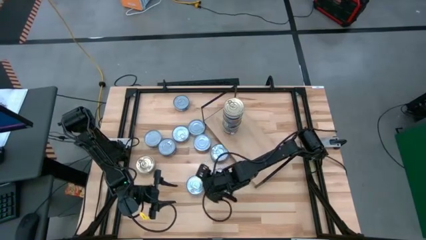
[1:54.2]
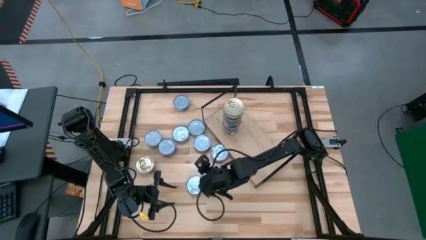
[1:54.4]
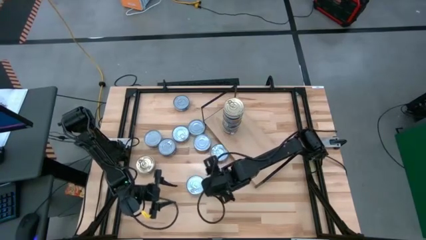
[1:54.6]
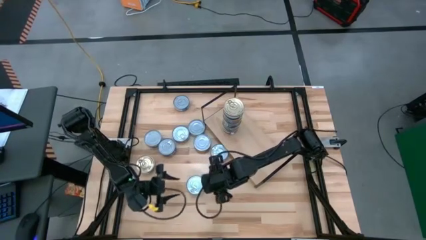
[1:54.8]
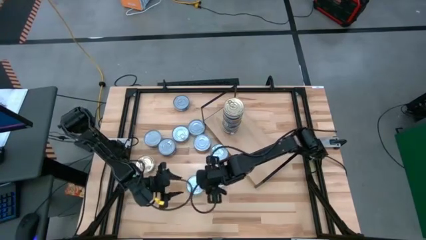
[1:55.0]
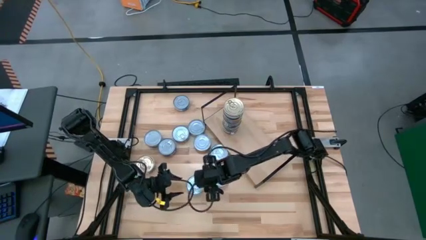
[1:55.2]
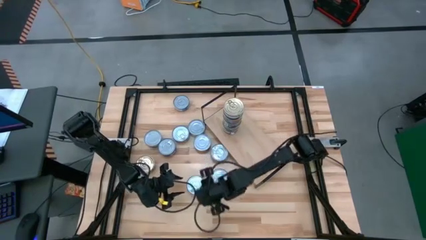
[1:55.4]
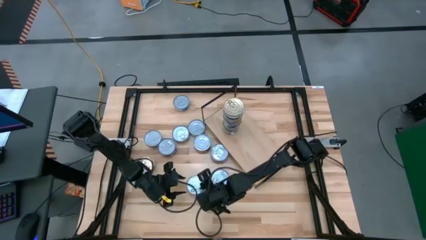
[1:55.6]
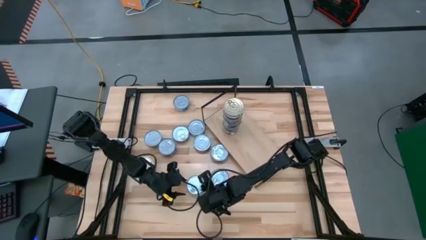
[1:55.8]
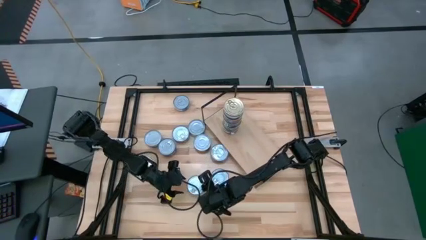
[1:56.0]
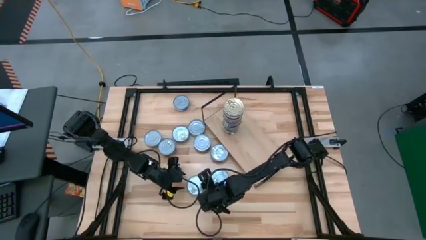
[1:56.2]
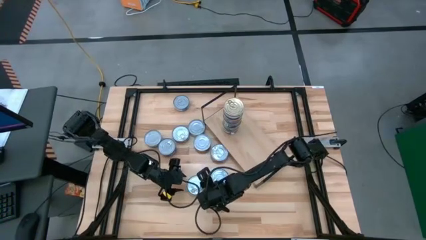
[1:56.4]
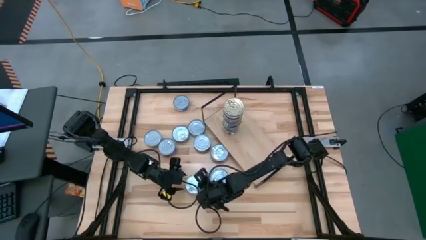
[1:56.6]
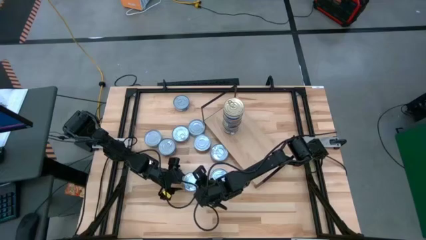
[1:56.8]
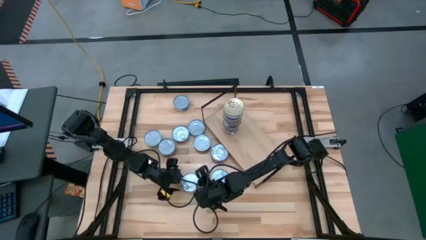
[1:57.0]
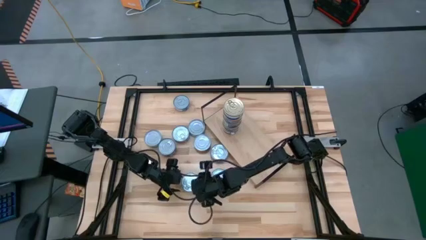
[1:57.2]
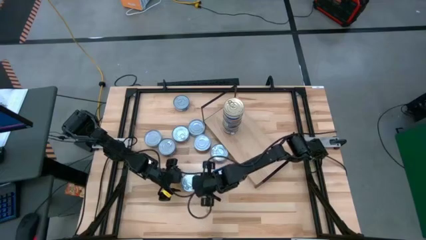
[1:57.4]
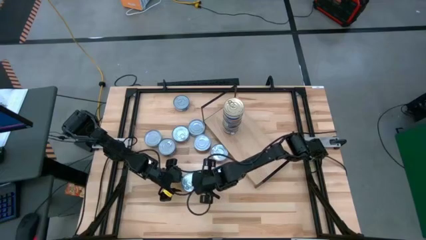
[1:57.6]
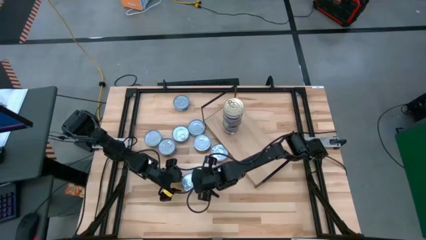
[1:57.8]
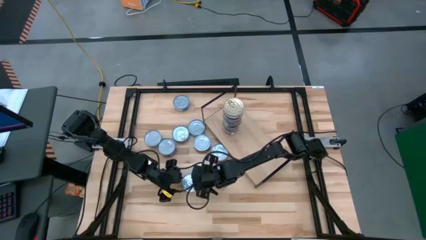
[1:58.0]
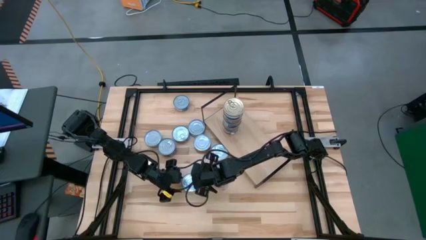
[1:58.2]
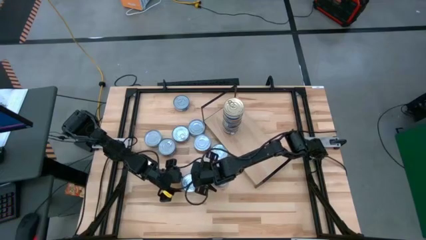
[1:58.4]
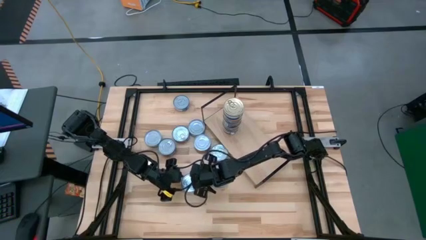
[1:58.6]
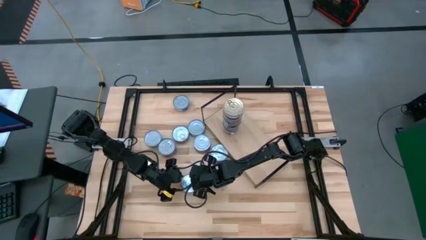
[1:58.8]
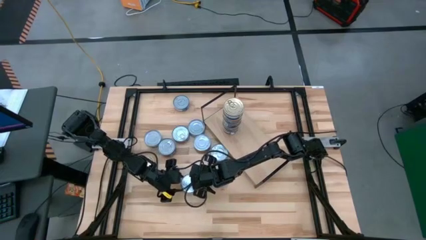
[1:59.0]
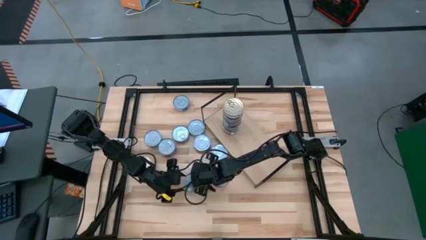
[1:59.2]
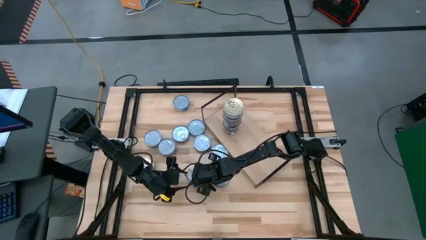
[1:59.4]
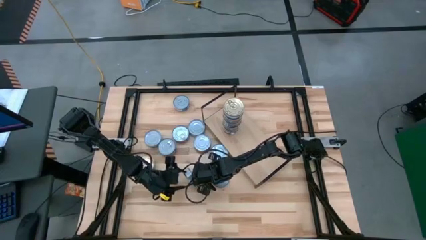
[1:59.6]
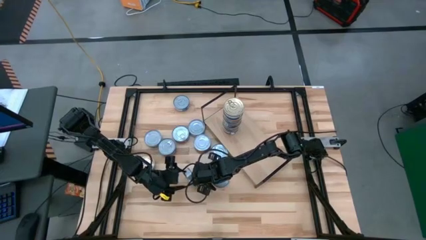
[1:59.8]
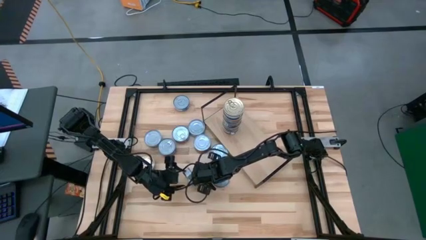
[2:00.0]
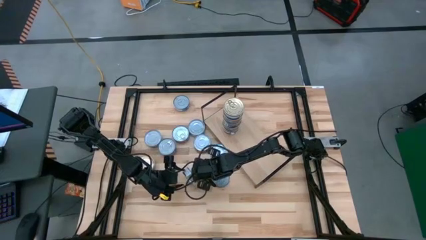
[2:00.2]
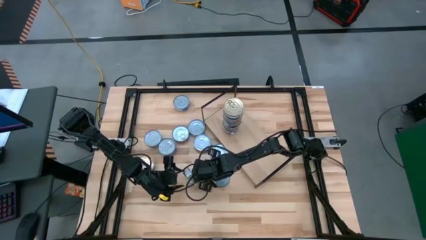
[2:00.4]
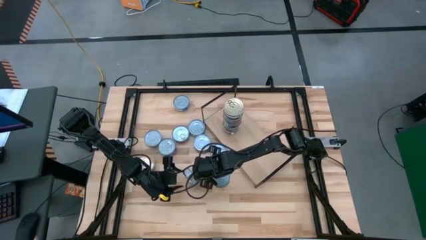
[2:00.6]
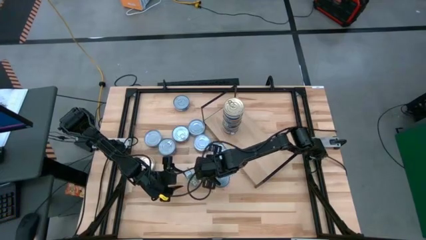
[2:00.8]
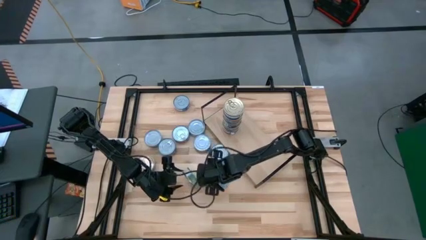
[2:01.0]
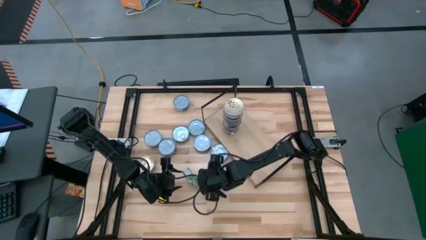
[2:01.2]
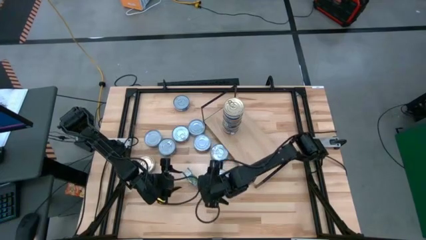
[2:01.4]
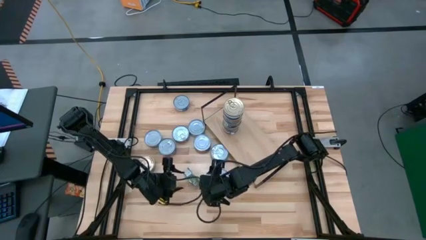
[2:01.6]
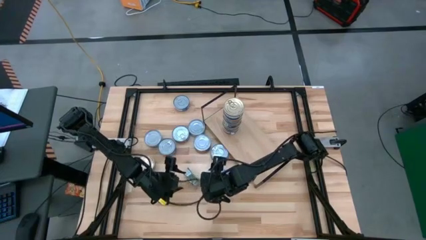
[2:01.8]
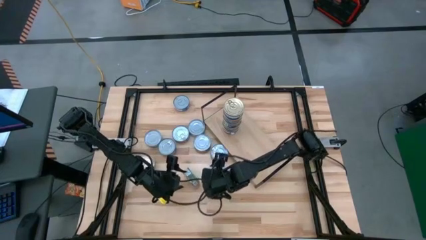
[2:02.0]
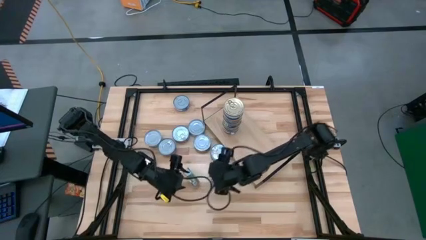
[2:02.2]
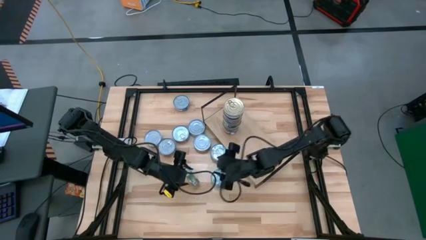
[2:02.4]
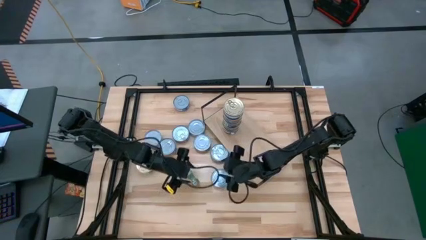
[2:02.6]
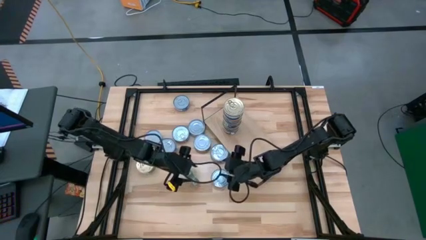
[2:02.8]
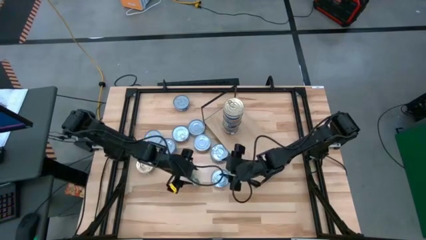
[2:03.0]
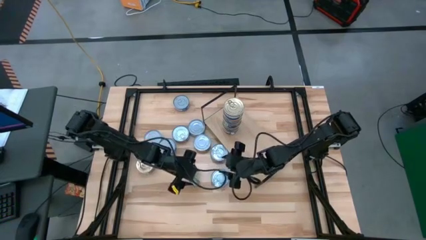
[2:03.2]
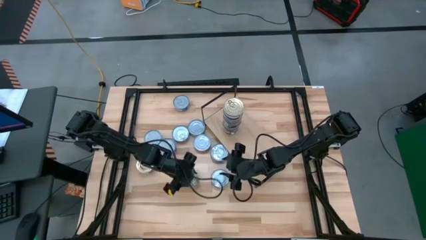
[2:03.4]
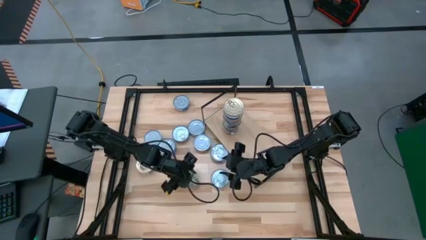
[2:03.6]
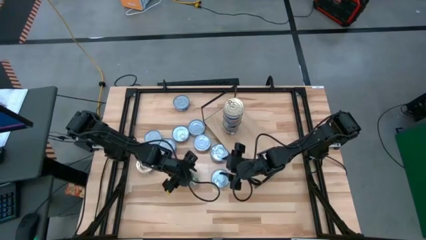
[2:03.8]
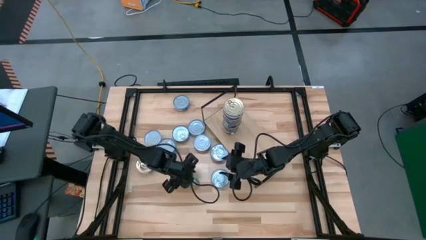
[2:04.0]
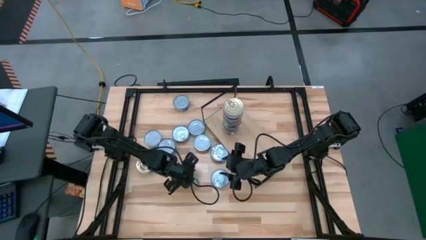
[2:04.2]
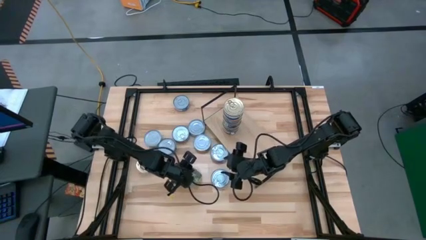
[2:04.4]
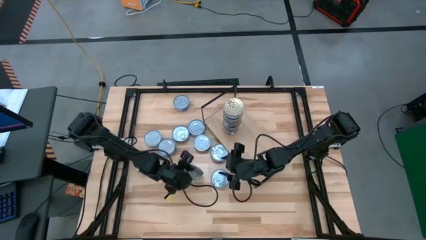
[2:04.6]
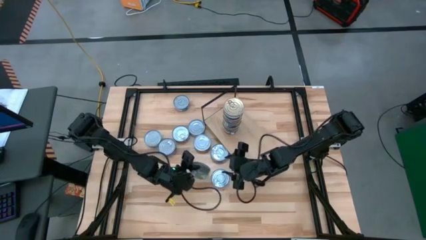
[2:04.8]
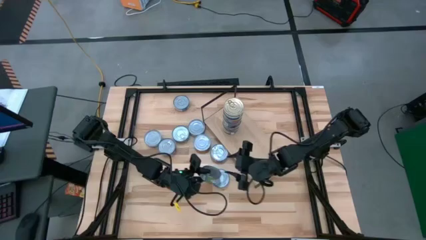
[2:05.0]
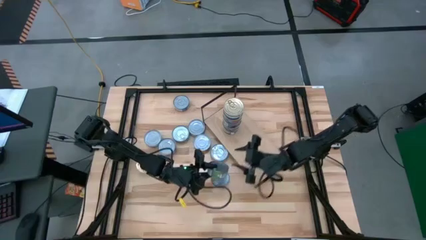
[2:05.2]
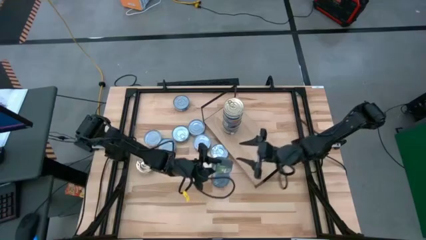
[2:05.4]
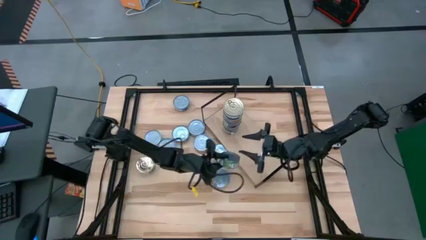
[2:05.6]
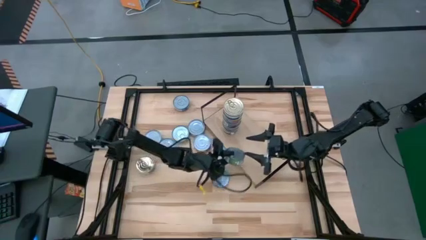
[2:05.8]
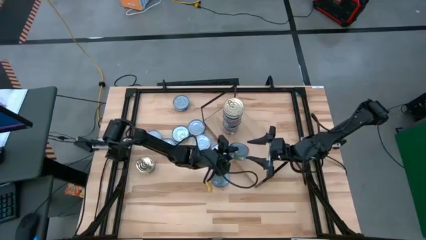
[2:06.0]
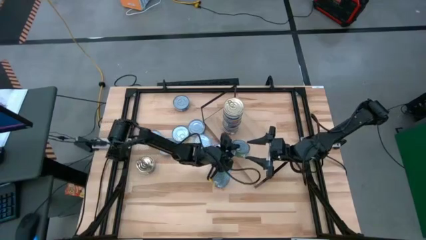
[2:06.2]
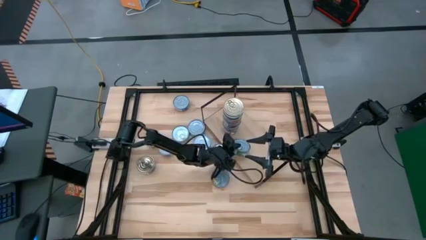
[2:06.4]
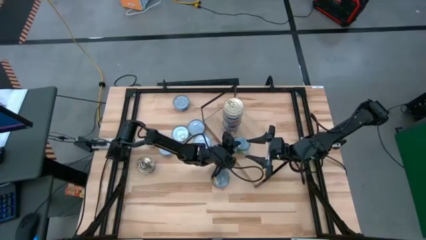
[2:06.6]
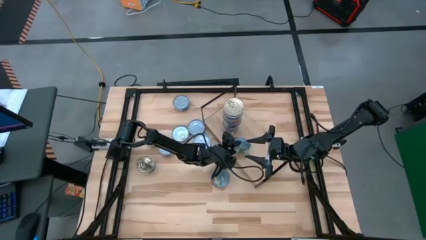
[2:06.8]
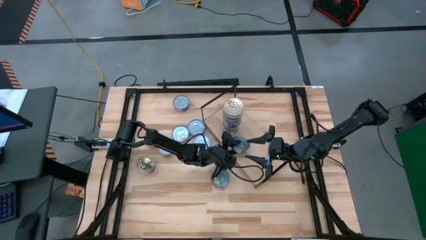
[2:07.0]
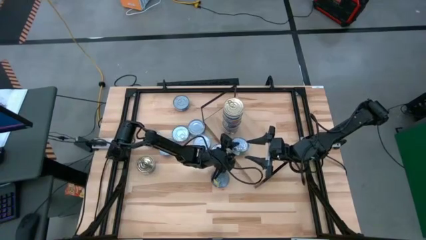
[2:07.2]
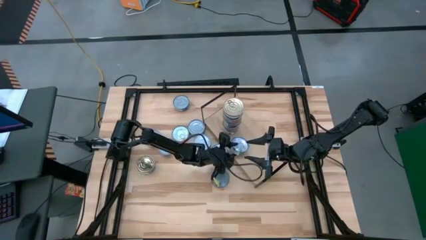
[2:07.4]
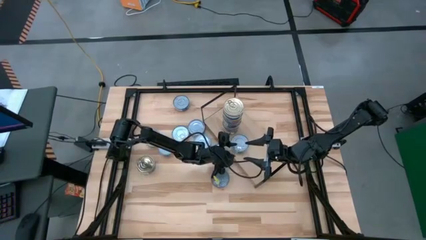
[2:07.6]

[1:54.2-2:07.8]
Task: Stack canned seafood by type on shelf
Put the green tuna can on the shelf
